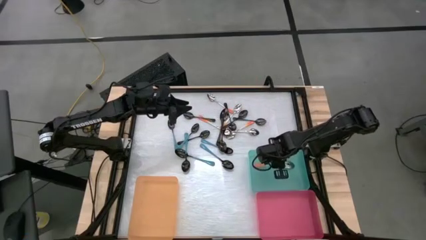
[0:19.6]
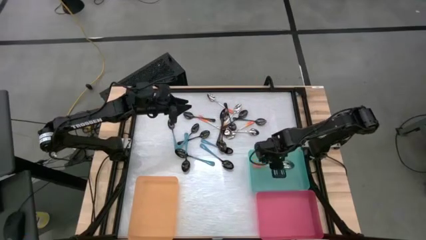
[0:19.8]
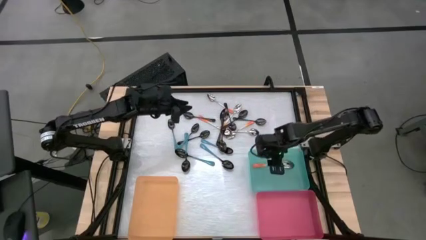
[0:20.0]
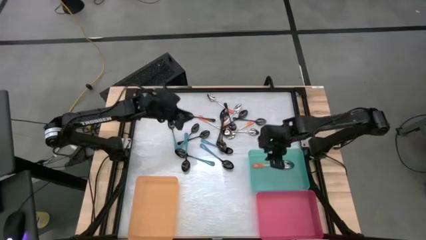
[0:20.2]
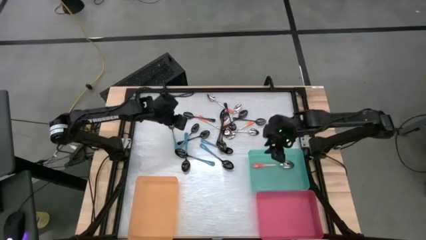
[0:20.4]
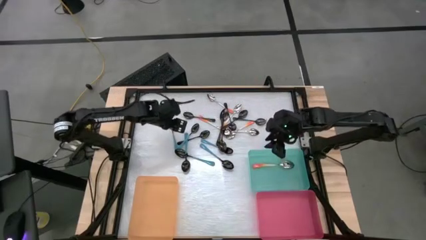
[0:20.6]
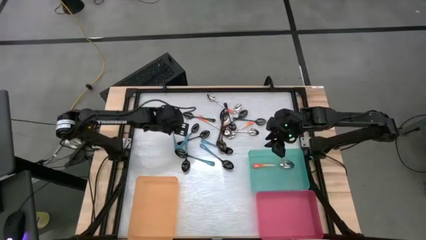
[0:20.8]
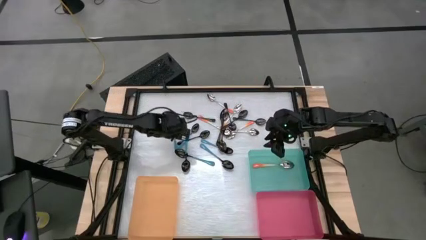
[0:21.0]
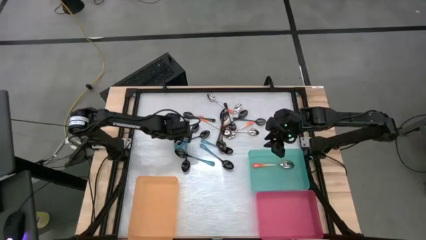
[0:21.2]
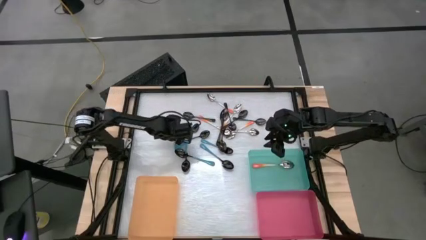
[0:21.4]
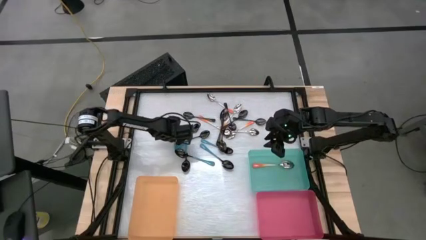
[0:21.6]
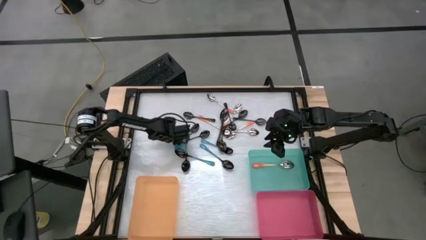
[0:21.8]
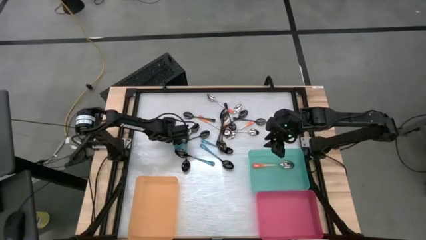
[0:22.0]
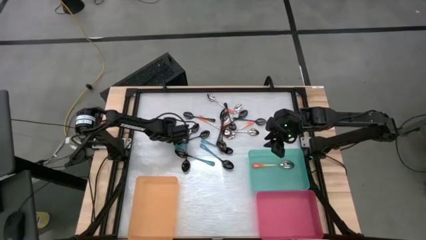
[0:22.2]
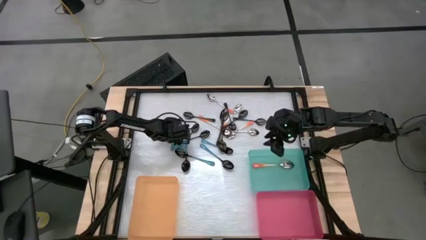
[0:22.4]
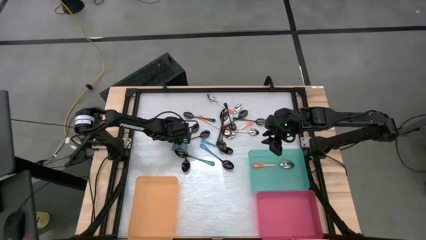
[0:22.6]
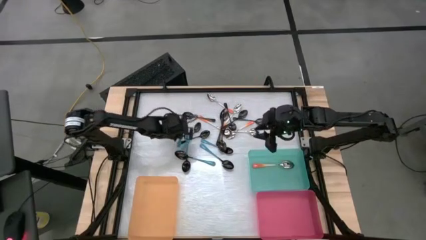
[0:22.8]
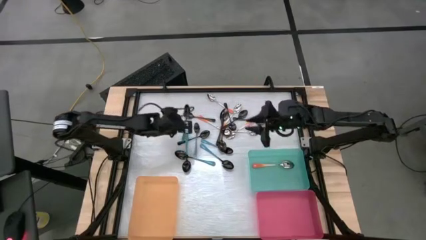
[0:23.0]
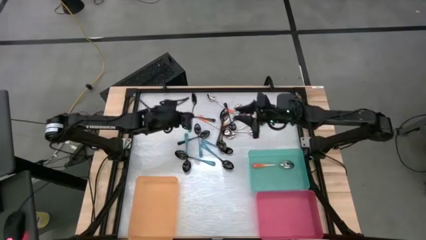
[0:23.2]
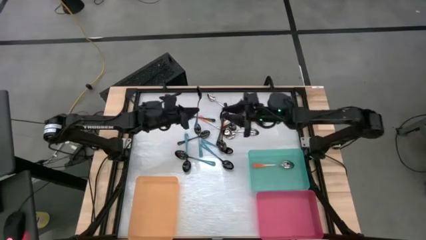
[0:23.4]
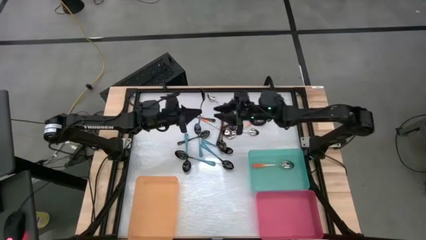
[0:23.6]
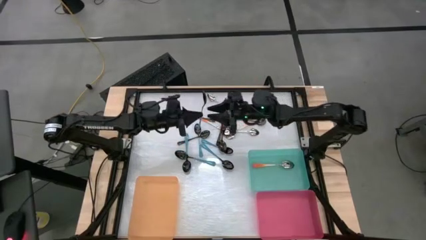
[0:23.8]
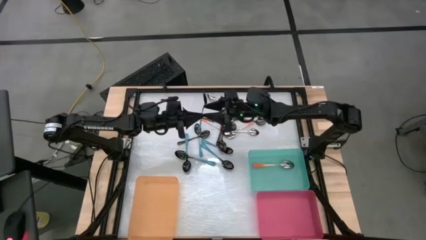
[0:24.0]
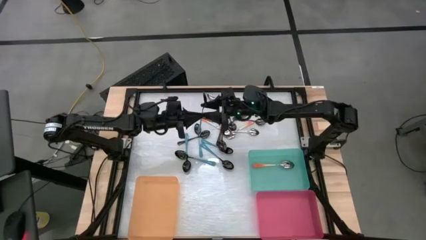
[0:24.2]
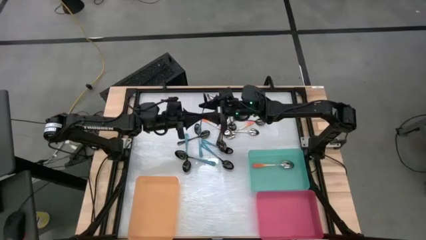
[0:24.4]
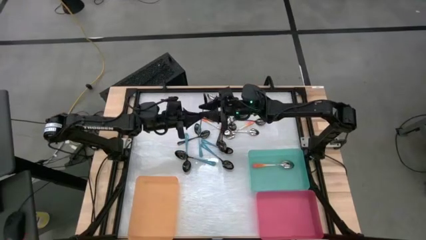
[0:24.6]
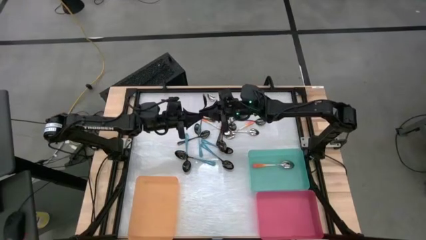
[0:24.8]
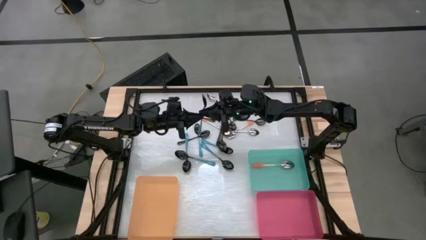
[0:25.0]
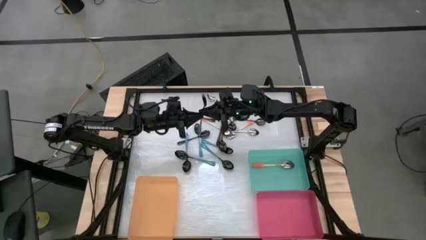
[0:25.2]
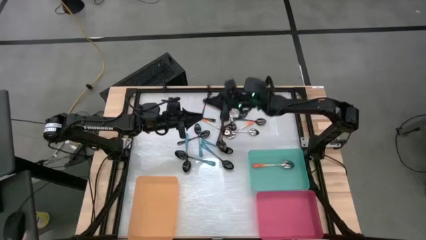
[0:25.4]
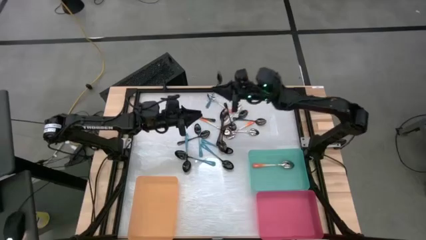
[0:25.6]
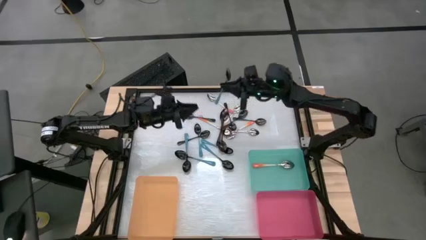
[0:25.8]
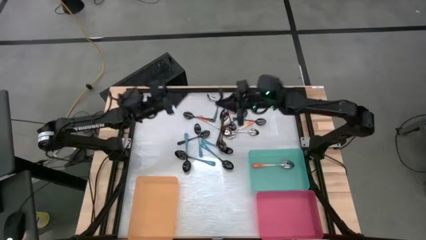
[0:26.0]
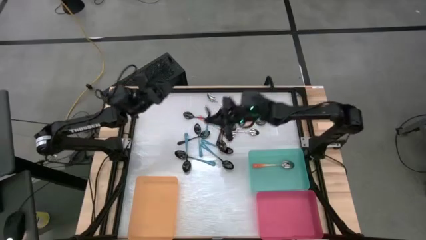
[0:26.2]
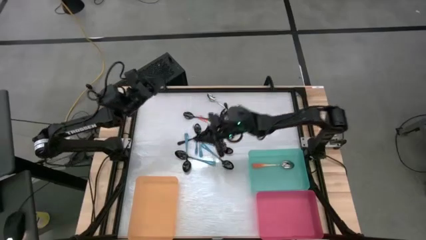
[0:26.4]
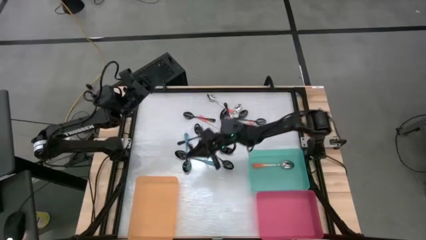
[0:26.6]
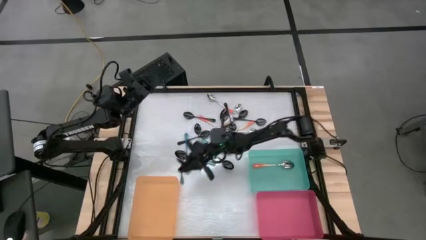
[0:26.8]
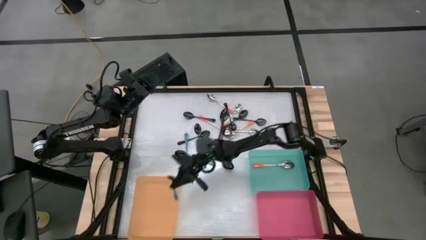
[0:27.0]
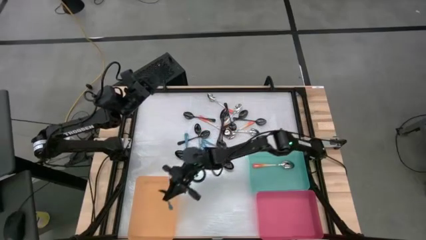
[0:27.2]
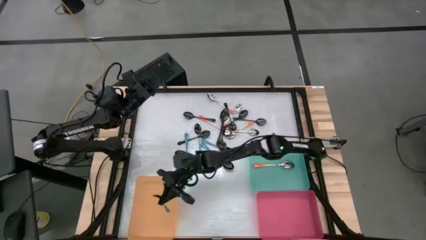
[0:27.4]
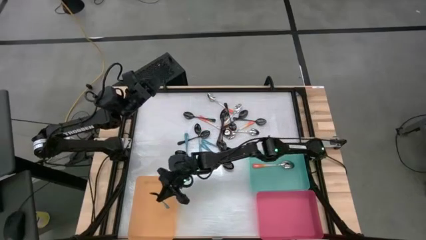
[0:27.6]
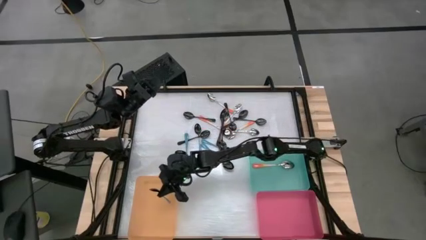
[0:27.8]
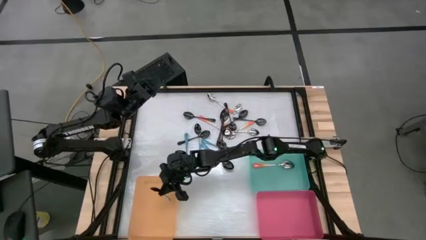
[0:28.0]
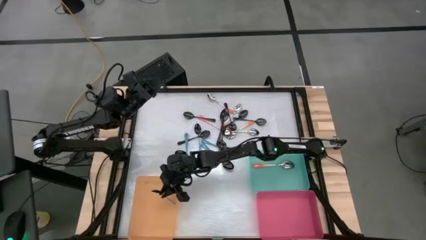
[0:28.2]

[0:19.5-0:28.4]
Task: Sort silverware by color (type)
Put the blue spoon into the orange bin

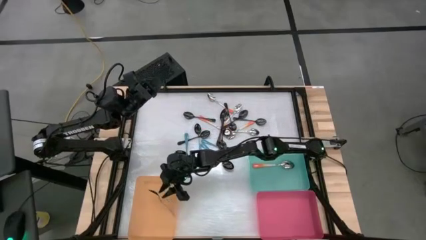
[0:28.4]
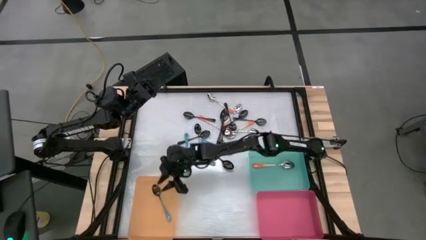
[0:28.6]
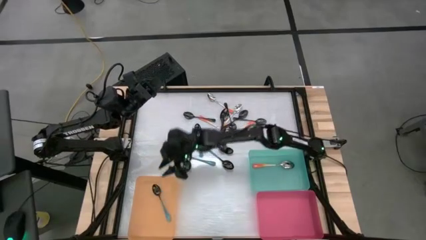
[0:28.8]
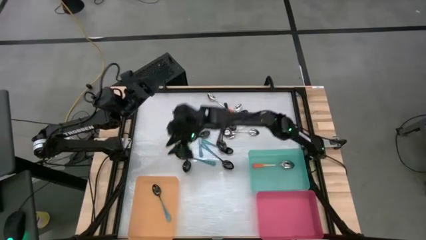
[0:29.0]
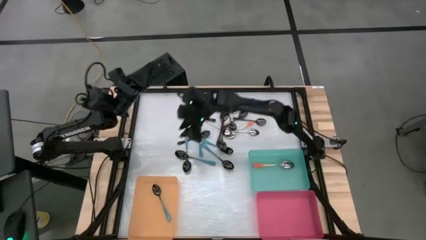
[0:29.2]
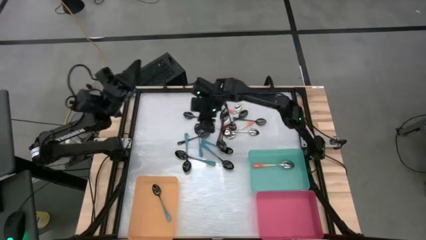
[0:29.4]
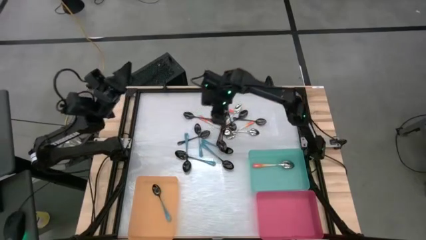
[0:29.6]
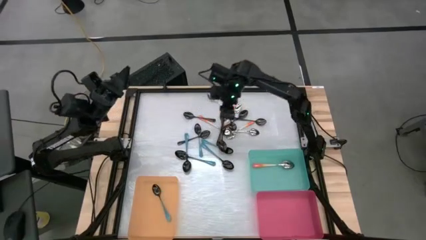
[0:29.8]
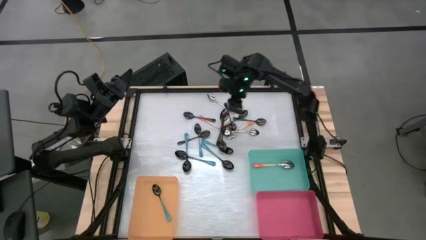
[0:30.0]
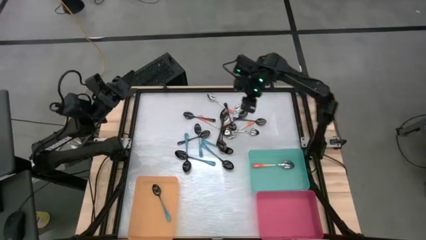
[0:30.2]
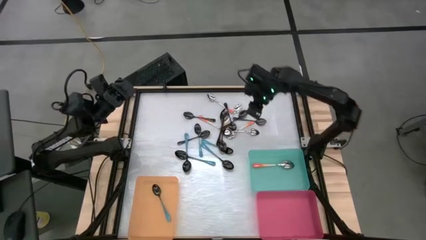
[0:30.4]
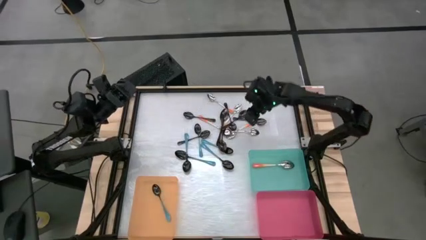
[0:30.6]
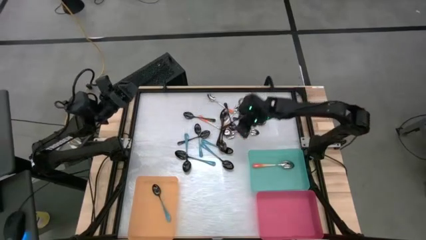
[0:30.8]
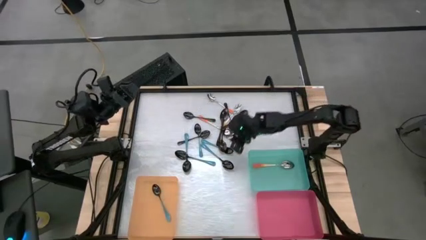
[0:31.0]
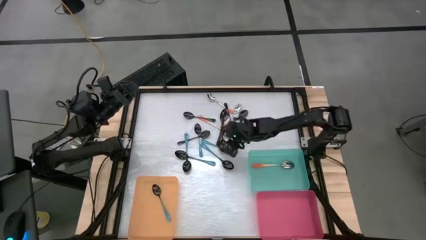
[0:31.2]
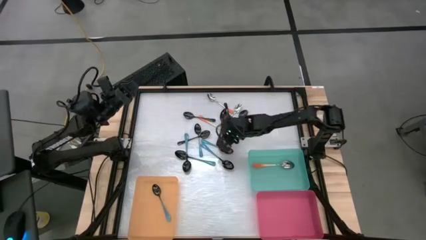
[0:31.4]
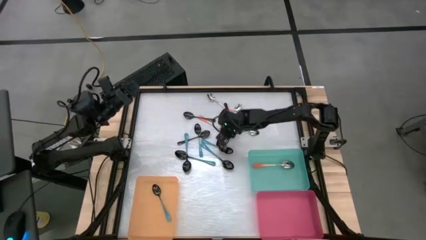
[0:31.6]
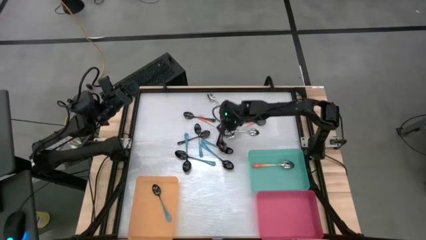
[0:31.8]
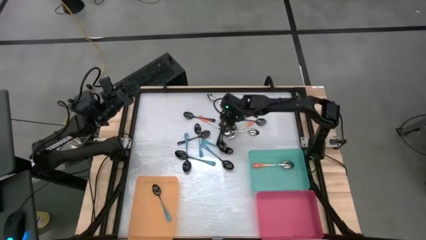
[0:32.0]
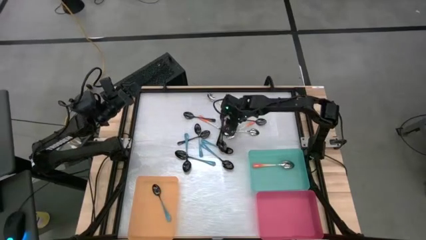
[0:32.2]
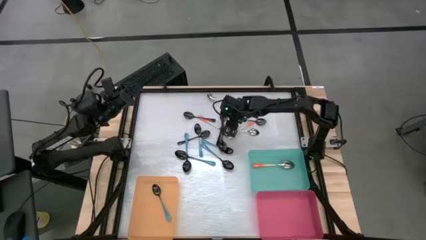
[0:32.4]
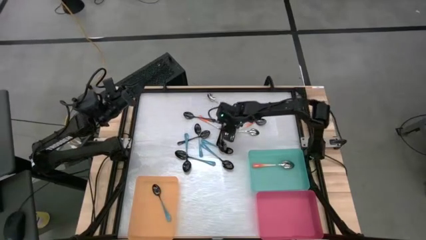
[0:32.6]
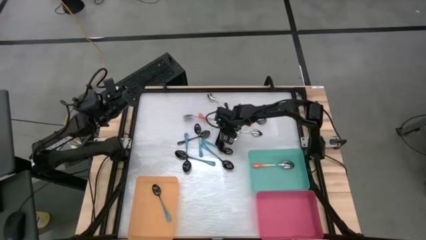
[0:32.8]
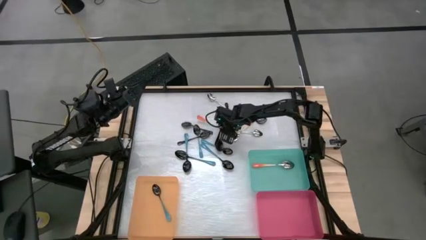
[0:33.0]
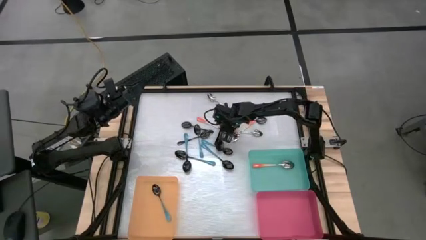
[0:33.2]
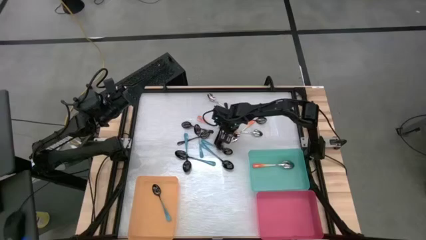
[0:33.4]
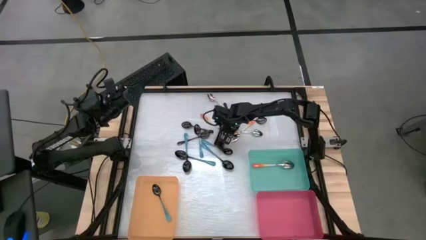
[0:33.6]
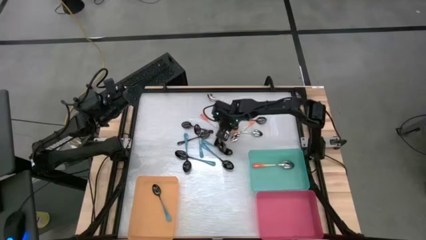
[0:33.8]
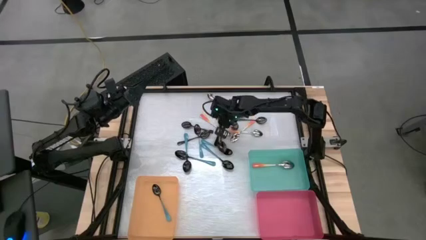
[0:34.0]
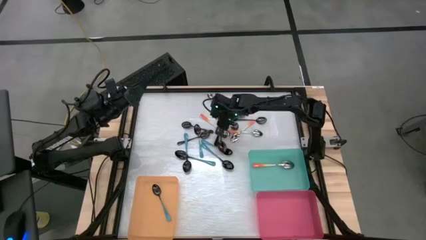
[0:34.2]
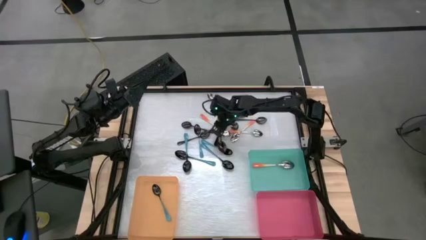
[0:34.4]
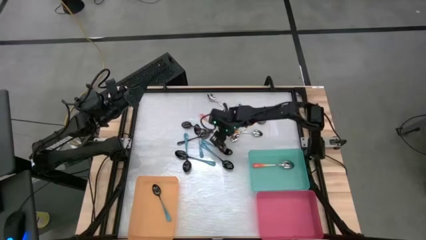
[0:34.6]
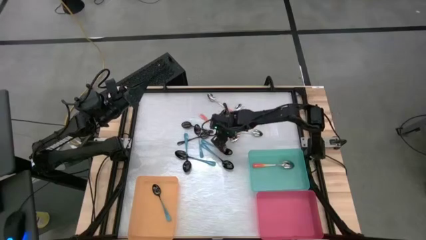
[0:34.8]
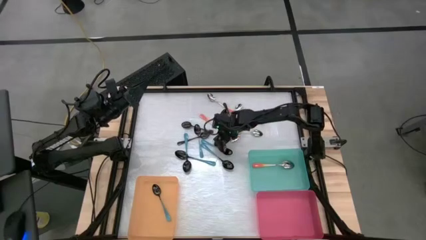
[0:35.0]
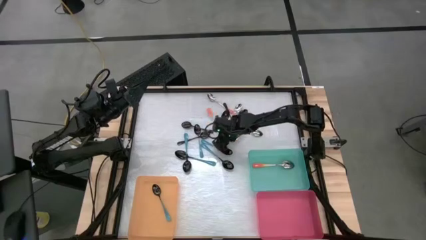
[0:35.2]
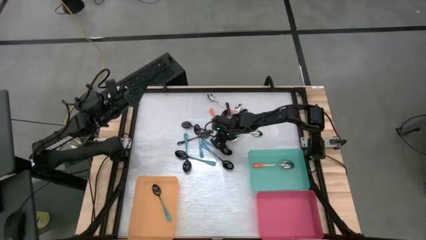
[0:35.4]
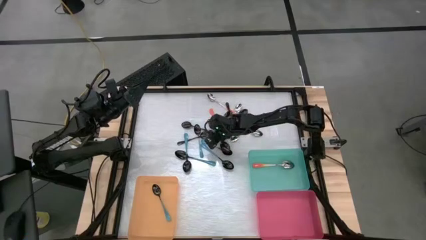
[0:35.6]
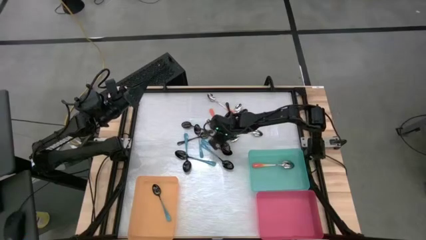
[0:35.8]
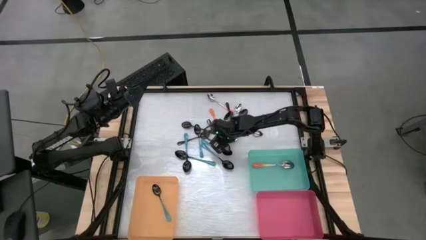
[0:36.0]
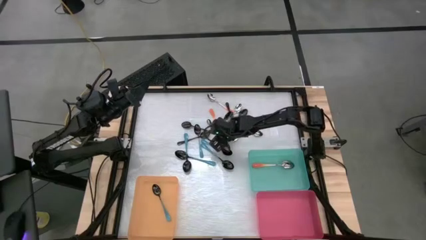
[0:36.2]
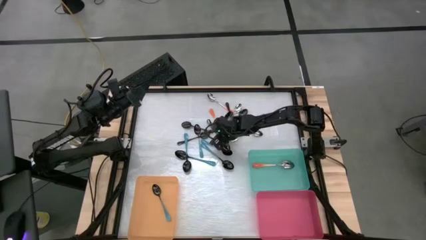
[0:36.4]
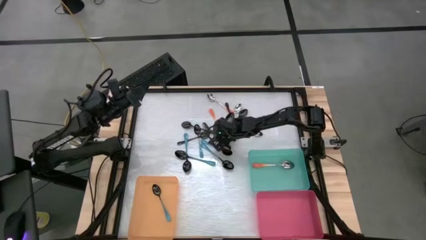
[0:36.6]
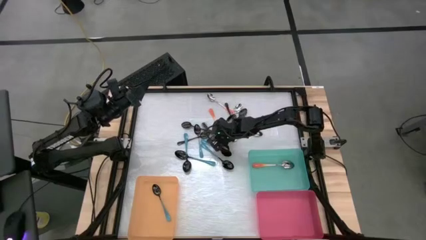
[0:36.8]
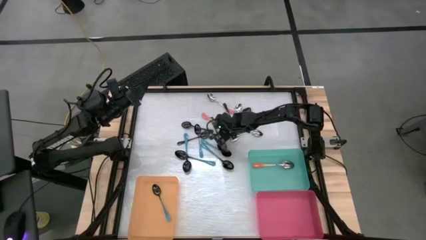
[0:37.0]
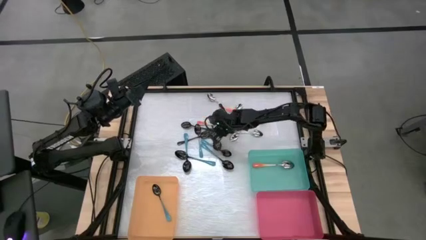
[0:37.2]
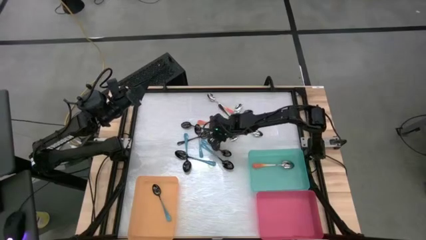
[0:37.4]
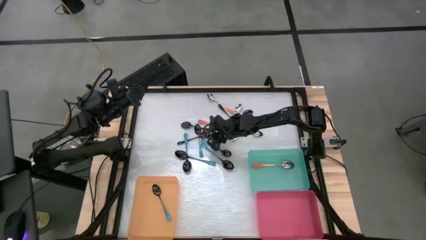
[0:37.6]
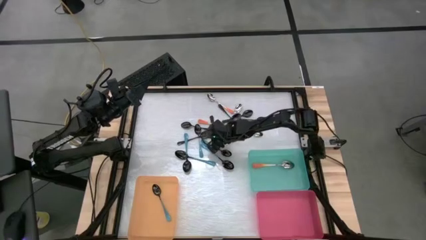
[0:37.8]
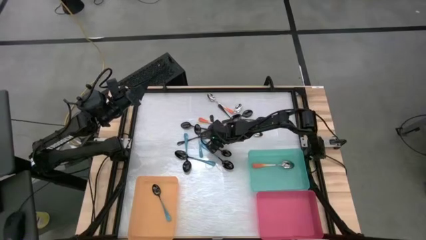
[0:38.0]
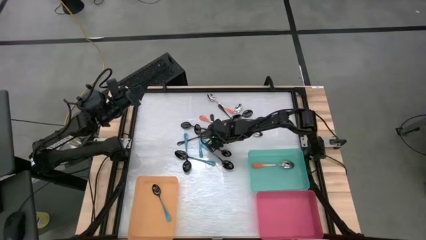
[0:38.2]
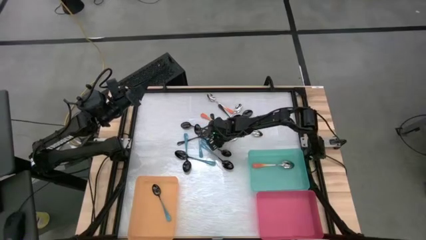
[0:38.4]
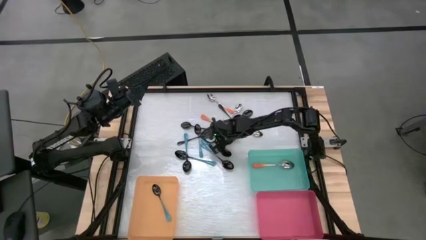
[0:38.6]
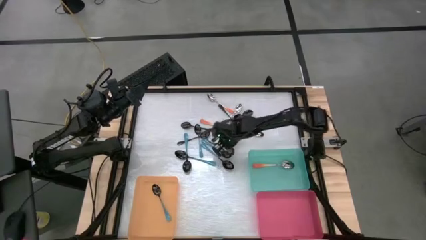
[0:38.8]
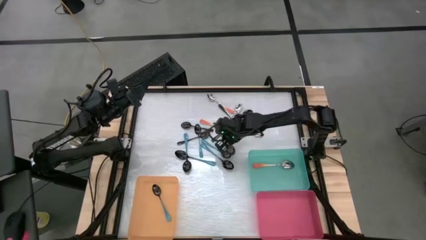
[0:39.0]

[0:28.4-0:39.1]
Put the black spoon into the pink bin
